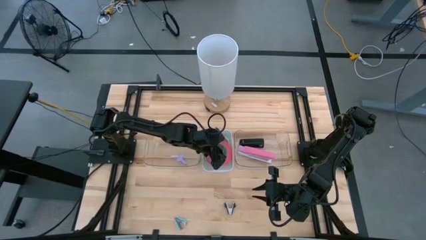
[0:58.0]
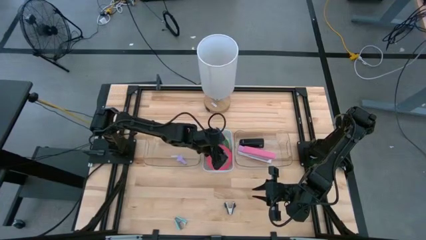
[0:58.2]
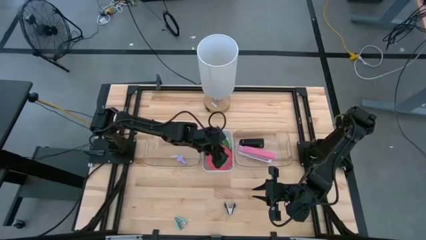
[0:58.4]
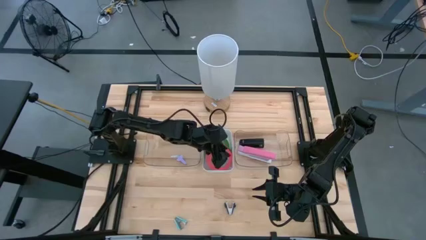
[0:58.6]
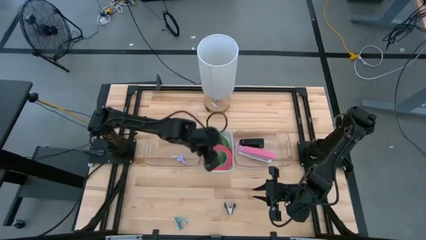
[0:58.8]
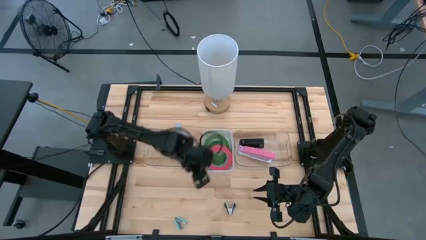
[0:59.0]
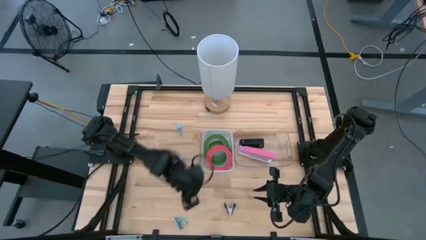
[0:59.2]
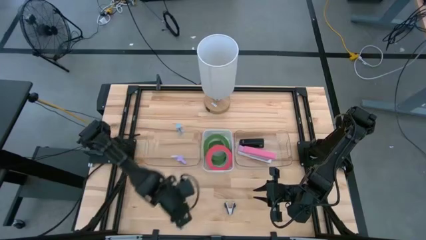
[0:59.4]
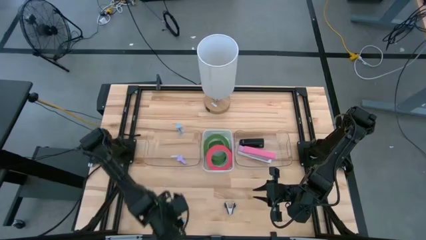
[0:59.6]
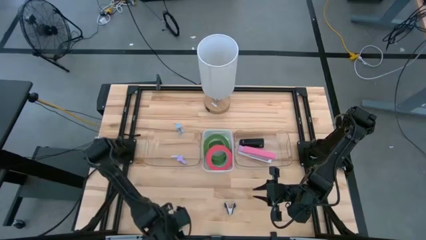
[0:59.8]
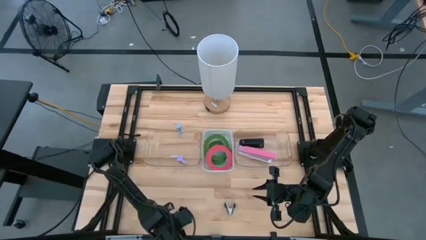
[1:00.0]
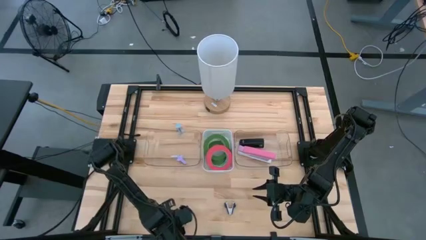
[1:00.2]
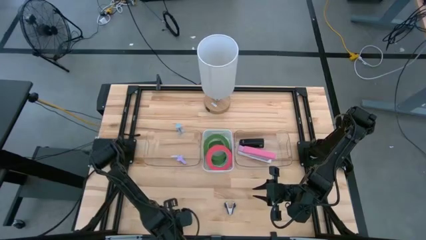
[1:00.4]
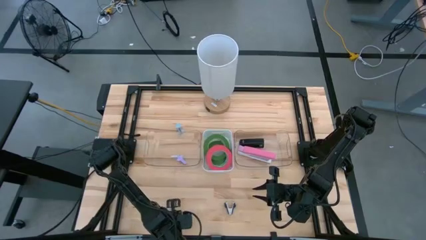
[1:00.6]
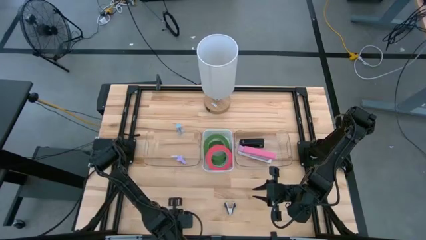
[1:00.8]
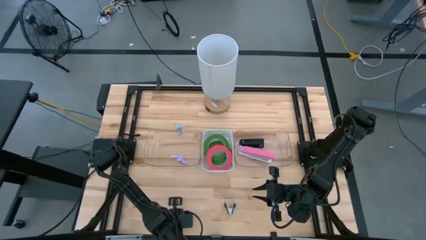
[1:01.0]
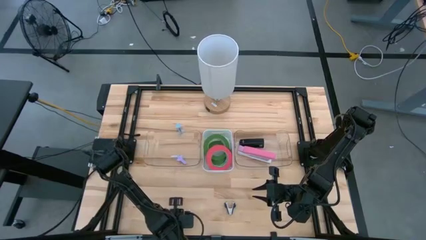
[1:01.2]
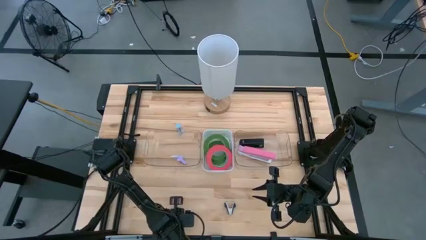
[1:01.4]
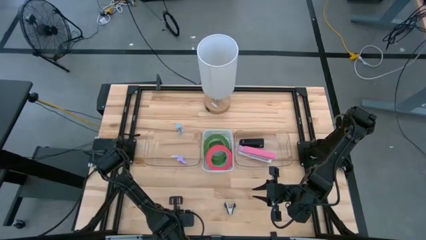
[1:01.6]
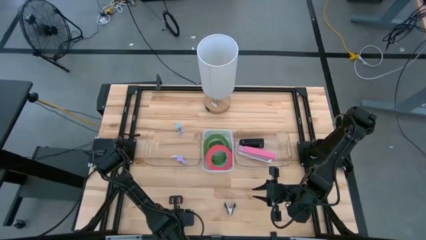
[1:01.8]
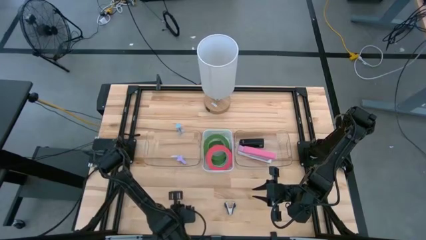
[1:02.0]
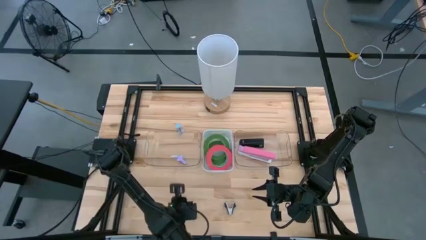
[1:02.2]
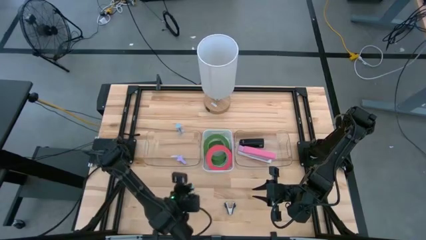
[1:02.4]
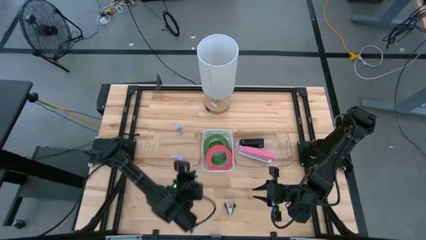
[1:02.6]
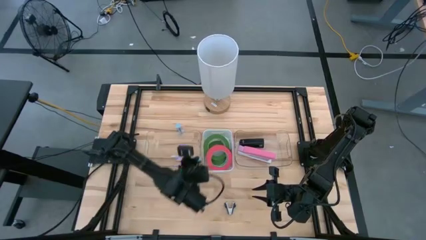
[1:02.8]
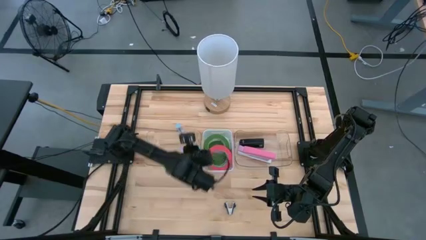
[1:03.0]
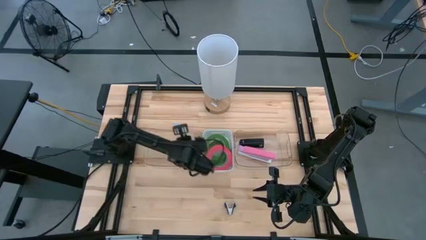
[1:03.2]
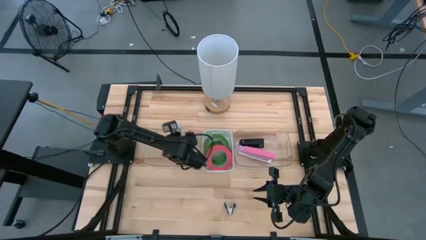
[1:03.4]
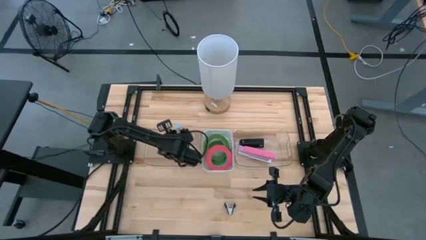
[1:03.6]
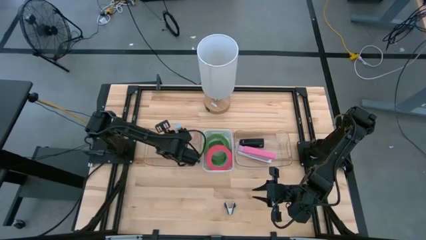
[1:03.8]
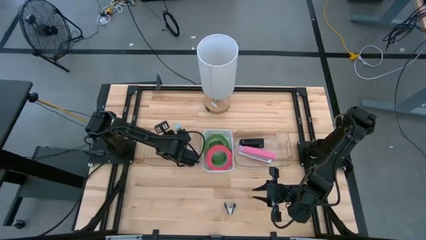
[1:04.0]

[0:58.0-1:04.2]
Task: Pick and place Stapler, Stapler remover, tape
Put the blue staple remover into the left transparent bin

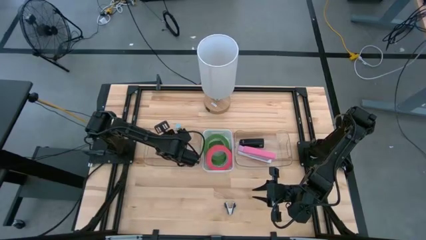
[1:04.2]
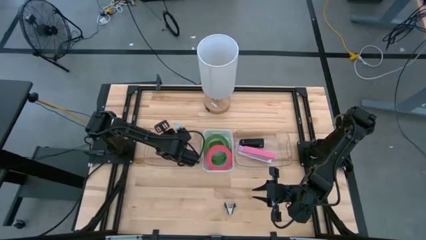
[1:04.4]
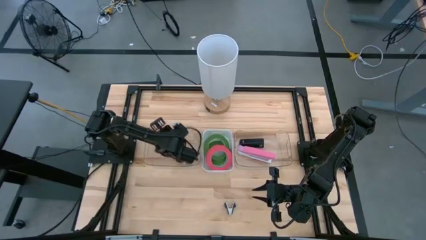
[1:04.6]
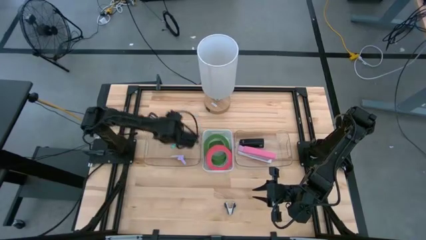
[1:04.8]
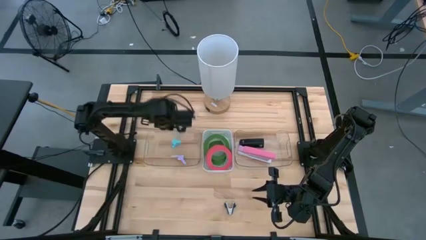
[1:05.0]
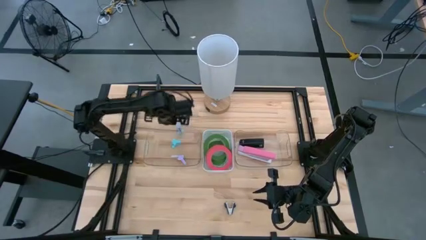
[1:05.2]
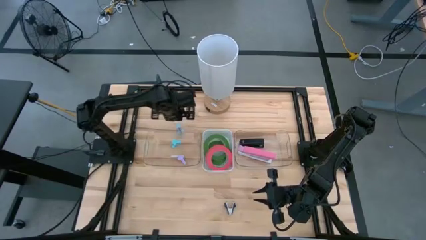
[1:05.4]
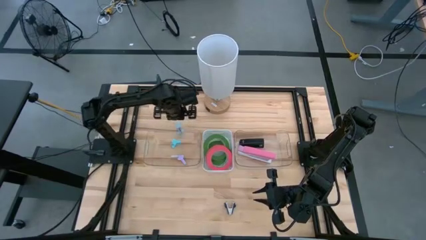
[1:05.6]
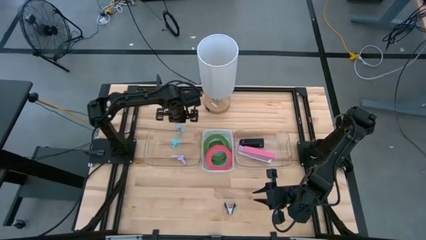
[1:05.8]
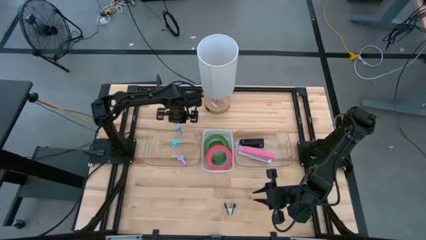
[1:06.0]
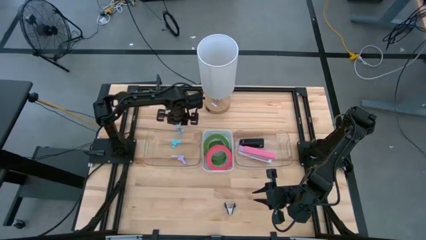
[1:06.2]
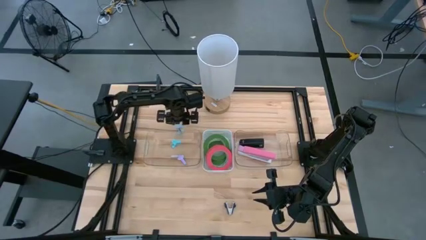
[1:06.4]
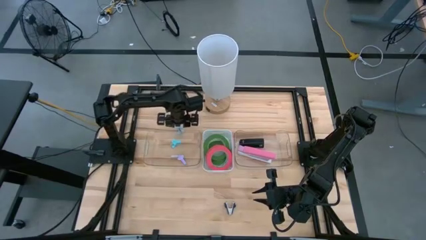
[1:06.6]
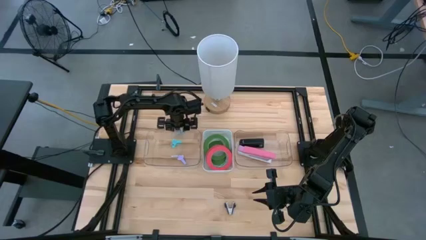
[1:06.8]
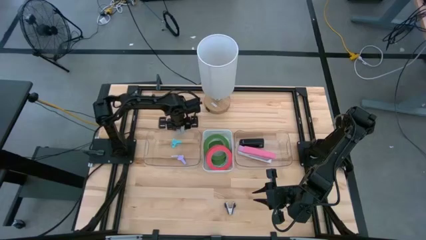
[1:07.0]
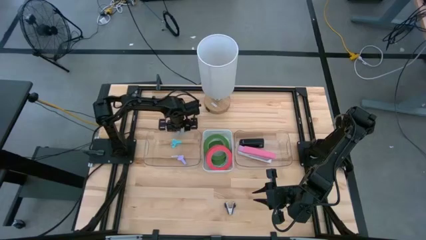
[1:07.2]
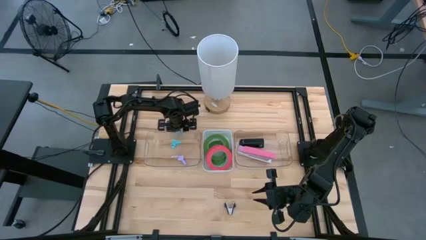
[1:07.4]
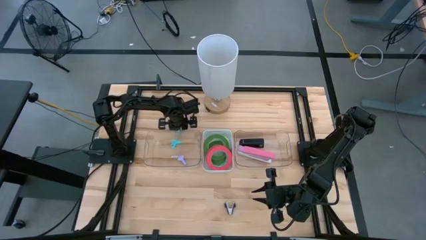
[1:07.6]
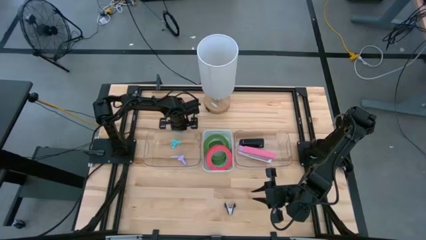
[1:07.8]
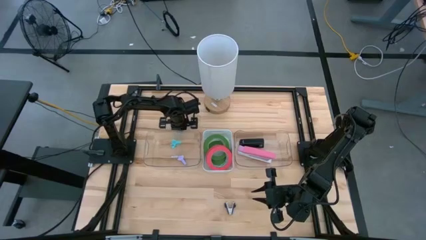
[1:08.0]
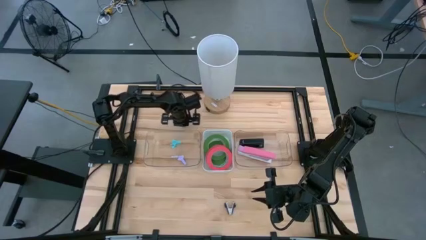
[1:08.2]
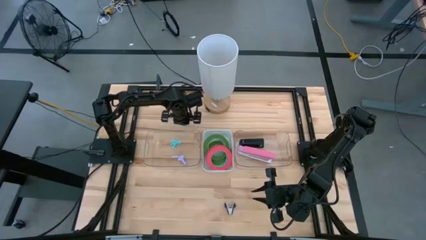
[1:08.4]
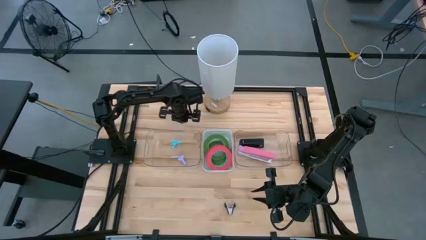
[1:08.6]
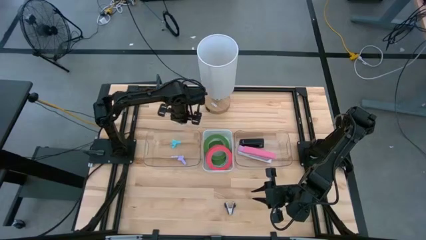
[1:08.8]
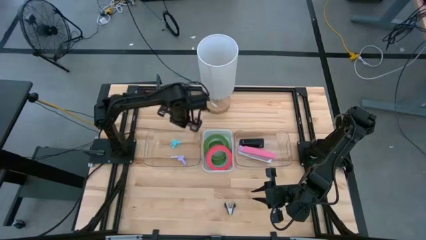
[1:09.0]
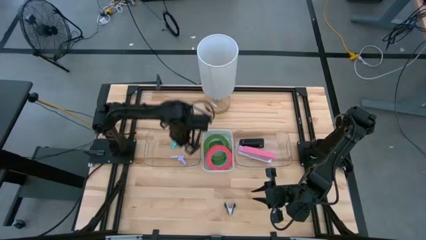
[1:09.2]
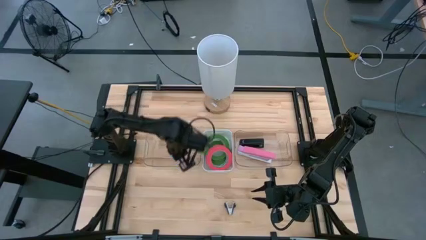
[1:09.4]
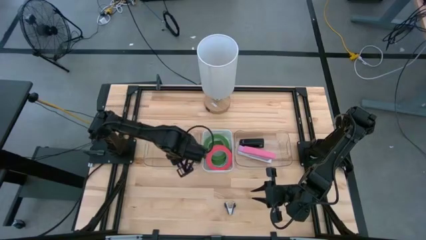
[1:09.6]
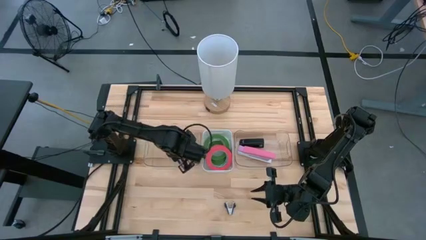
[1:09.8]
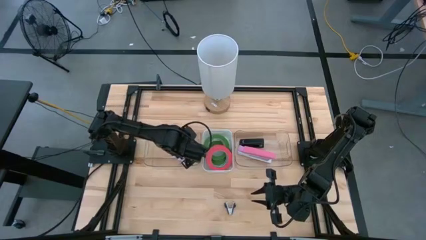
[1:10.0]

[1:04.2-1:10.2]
Put the gray staple remover into the left transparent bin

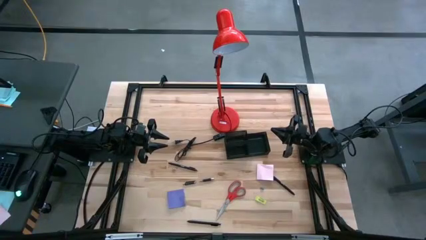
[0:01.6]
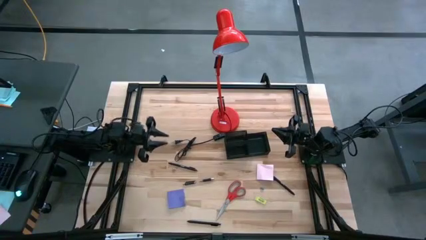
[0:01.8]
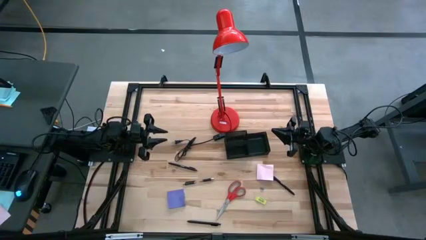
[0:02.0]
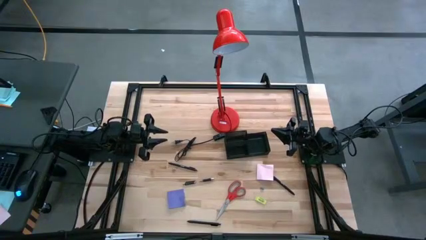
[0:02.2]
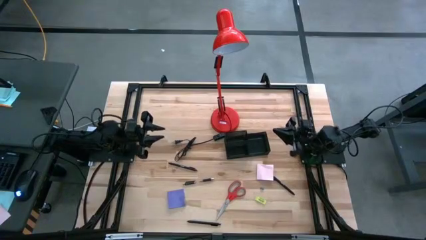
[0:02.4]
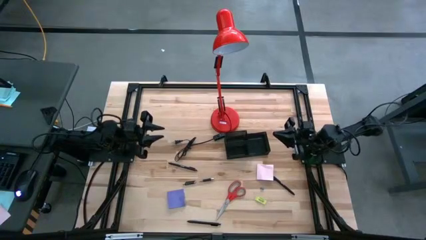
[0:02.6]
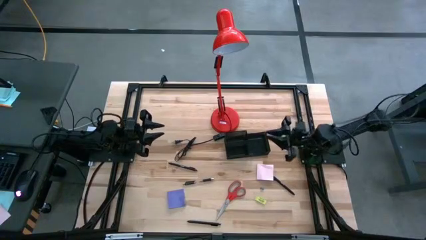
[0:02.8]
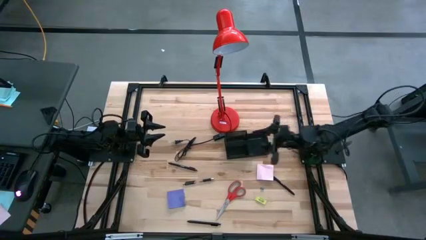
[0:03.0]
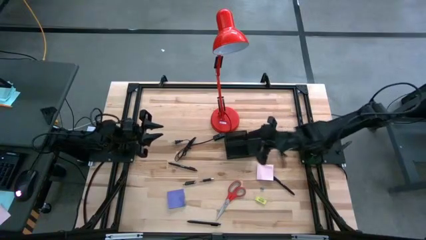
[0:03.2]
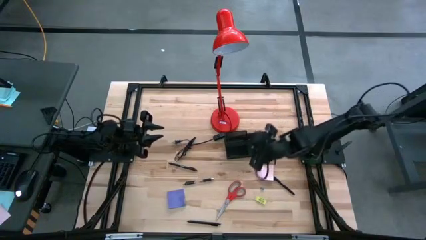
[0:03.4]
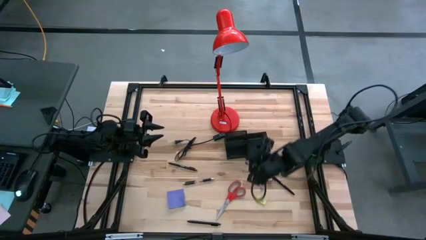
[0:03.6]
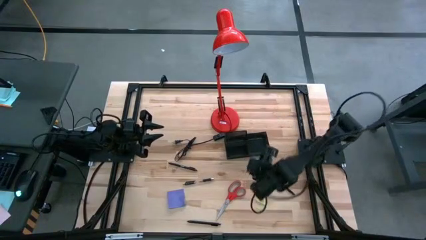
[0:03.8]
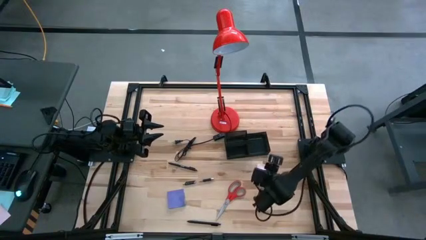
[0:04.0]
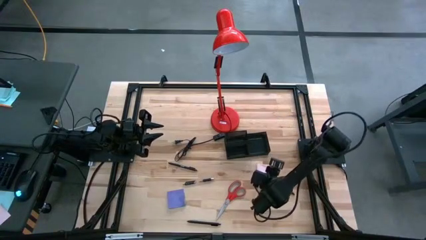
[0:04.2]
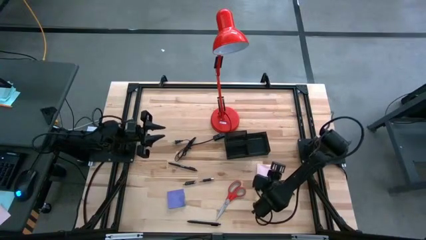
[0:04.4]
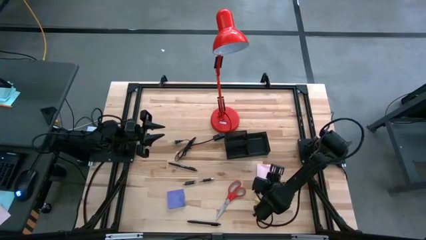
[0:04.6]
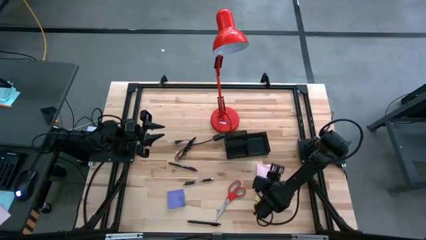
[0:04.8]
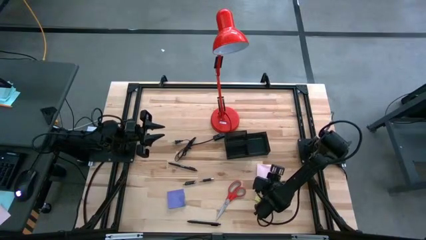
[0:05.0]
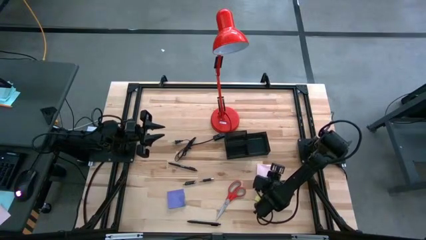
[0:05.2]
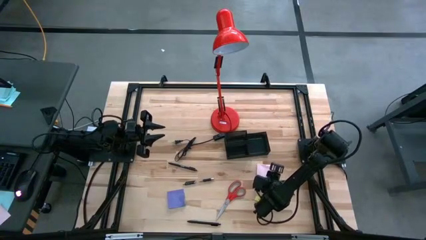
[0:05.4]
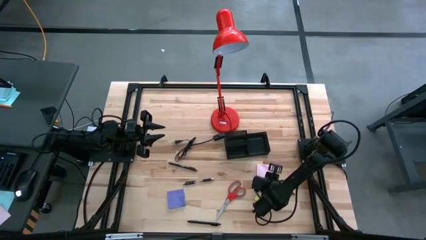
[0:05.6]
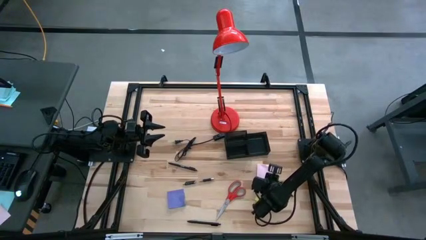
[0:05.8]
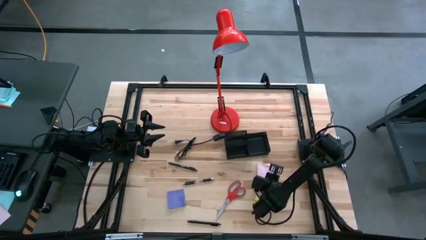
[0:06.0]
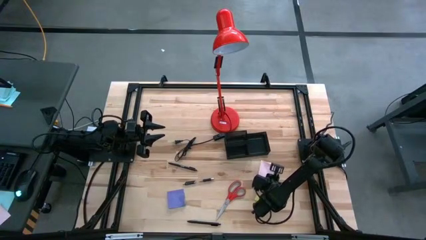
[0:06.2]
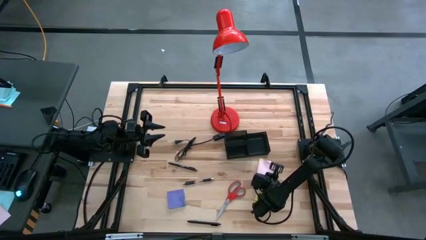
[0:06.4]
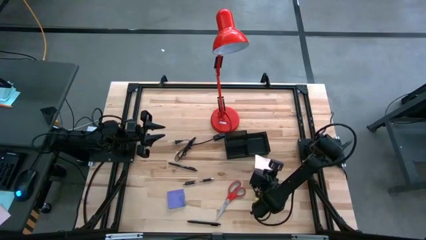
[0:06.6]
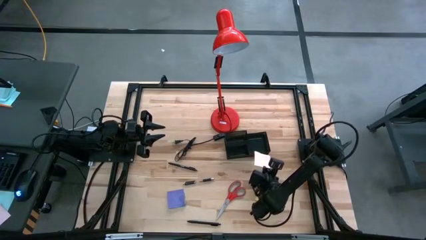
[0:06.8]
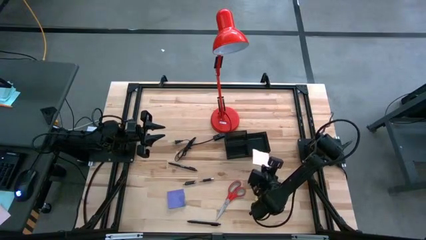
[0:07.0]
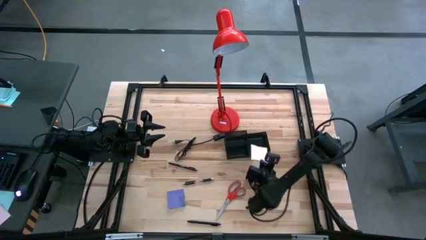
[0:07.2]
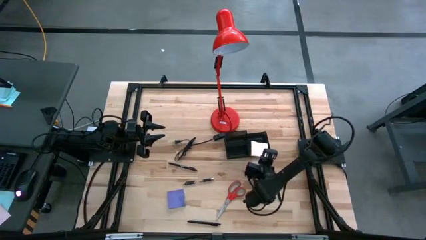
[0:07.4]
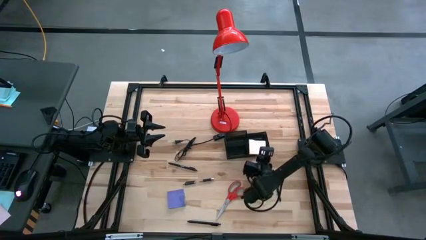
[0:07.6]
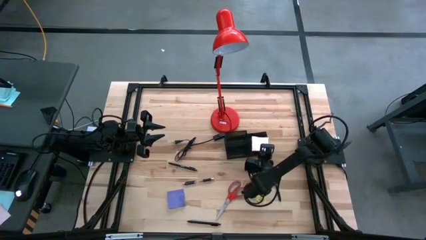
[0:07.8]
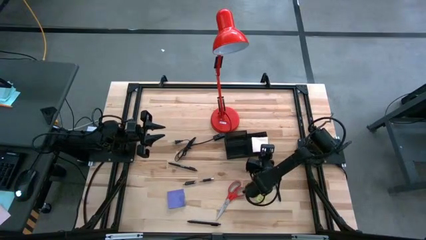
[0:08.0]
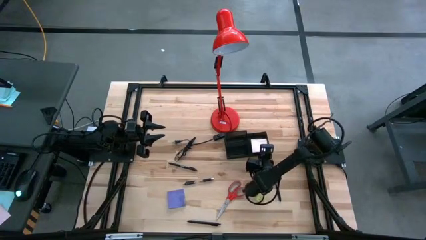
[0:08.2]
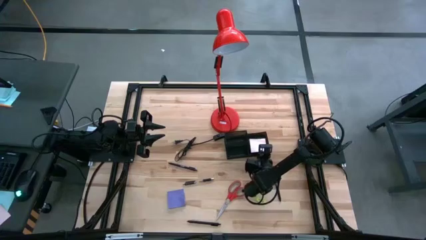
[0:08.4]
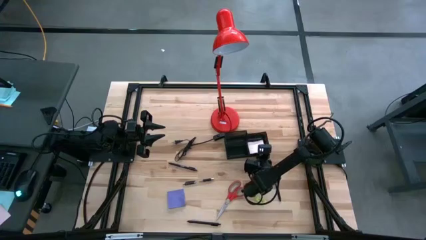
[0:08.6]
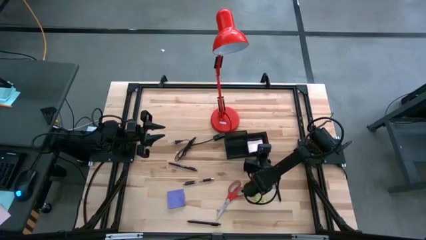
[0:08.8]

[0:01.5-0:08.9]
Task: Pick and place office supplies into organizer
Put the pink sticky notes into the desk organizer
